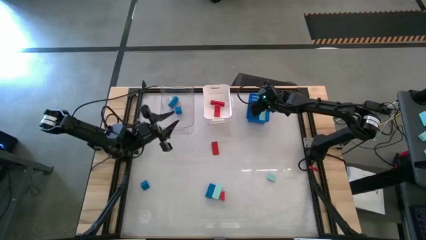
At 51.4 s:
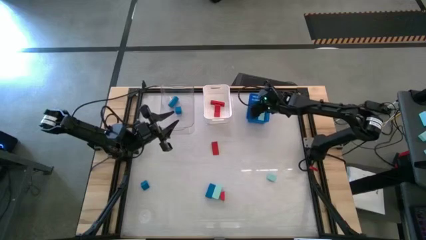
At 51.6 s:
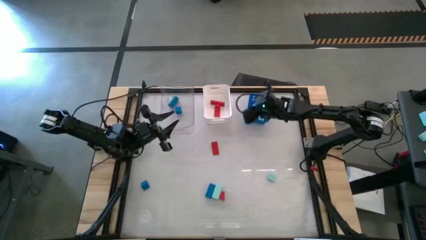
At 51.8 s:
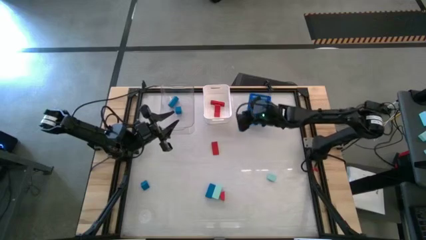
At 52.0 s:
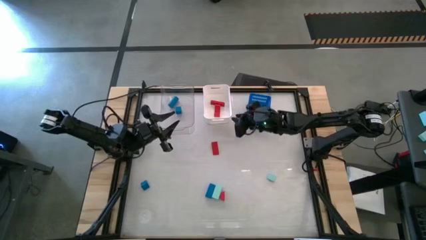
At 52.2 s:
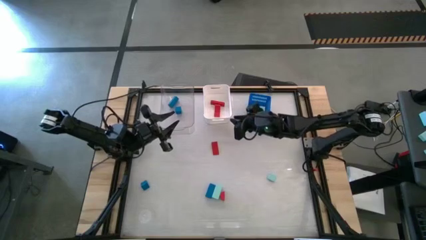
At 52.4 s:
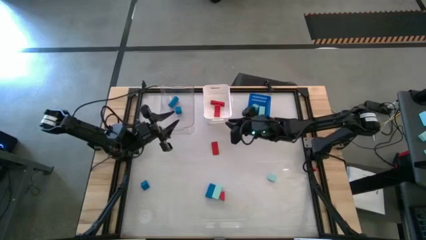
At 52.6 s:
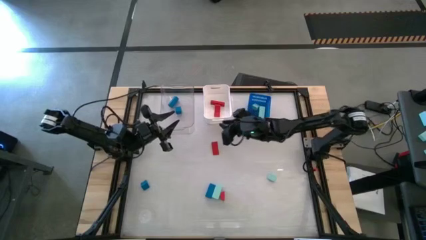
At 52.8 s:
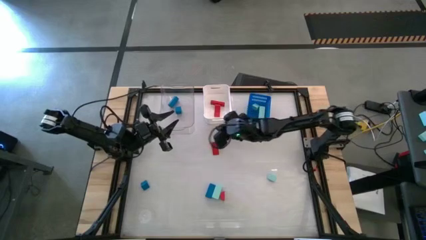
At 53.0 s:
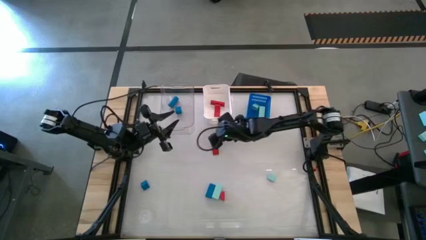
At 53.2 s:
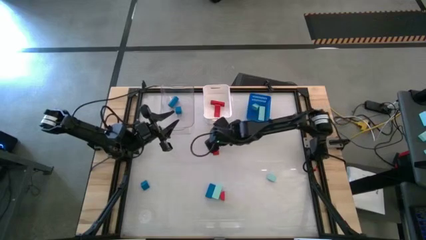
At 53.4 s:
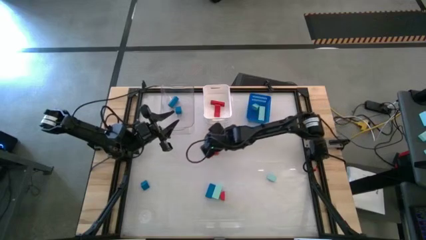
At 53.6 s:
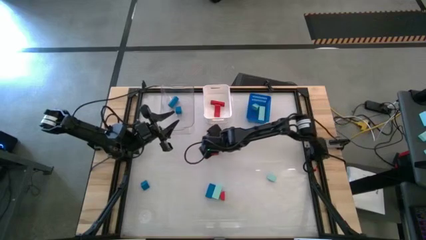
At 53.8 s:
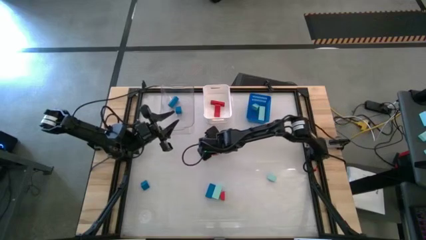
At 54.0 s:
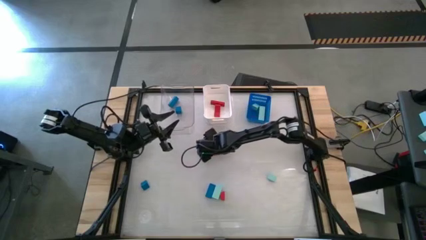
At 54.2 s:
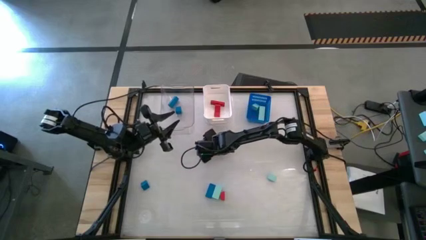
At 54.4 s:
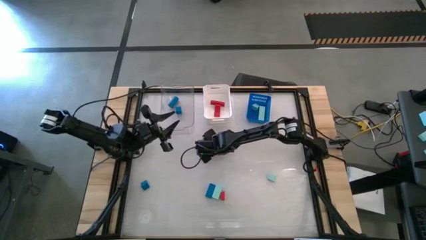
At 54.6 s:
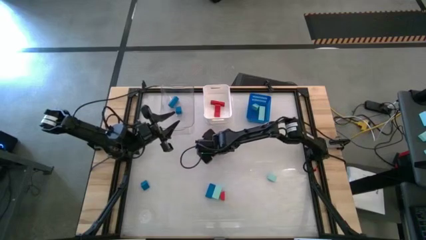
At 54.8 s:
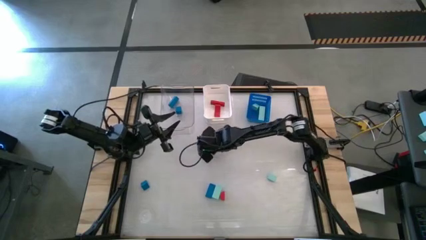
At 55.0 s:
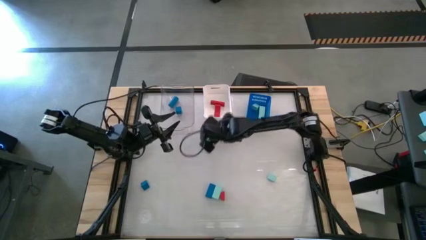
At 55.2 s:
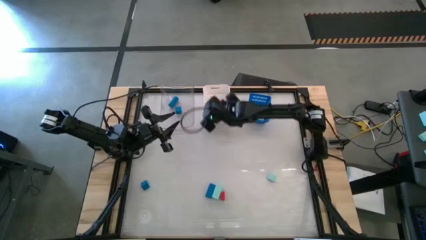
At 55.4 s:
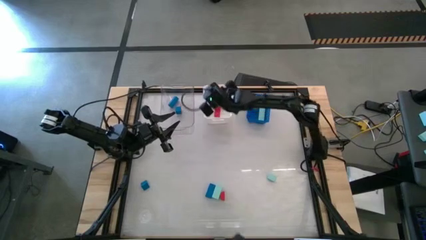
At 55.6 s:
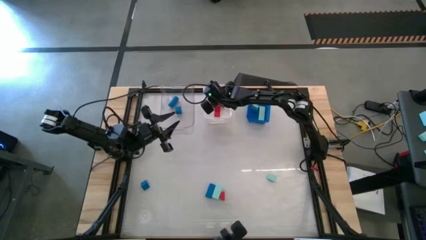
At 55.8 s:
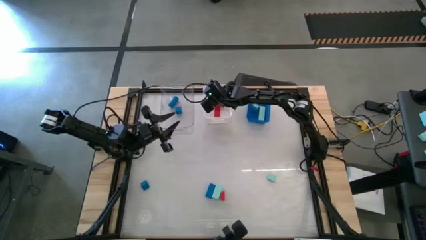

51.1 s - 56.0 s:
Task: Sort & place blocks by color
Put the top red block into the white bin

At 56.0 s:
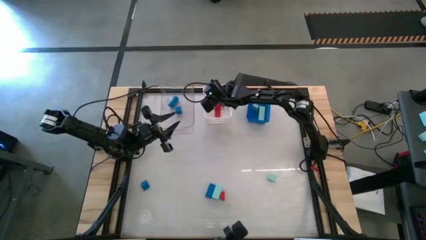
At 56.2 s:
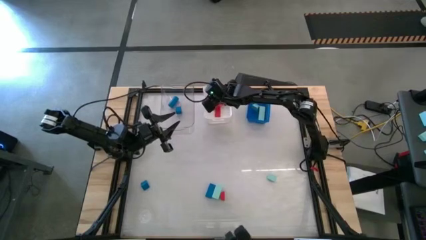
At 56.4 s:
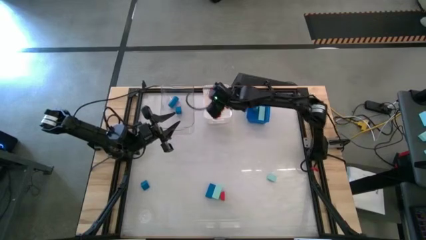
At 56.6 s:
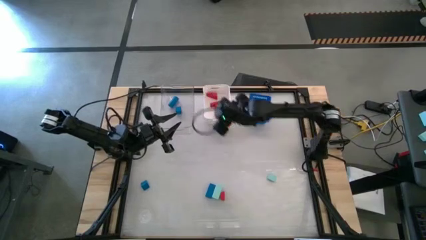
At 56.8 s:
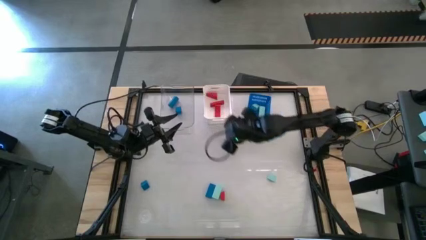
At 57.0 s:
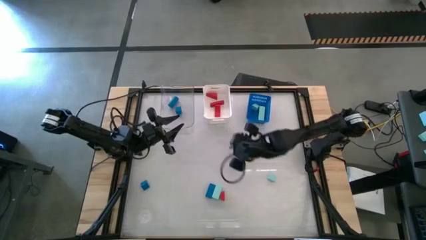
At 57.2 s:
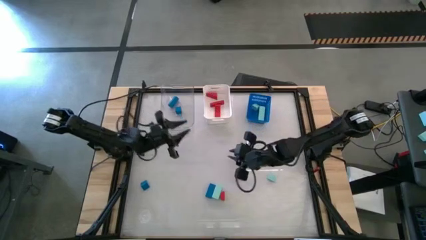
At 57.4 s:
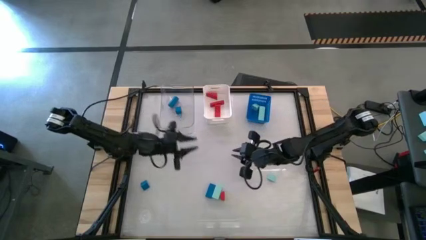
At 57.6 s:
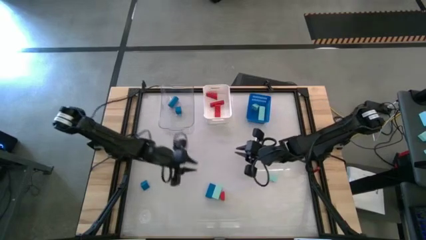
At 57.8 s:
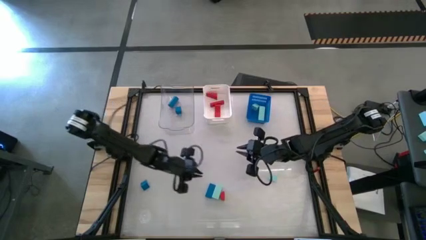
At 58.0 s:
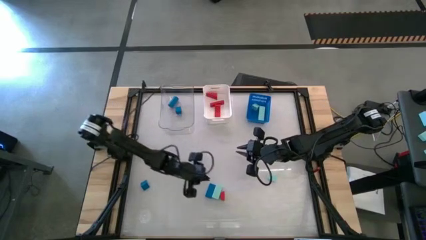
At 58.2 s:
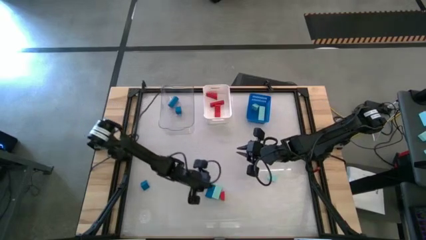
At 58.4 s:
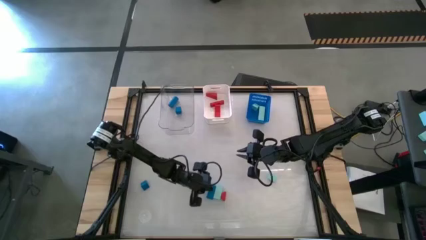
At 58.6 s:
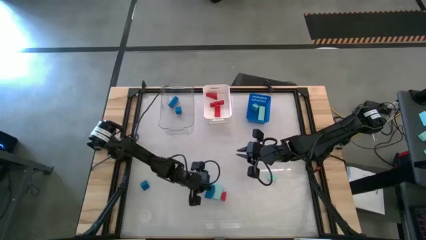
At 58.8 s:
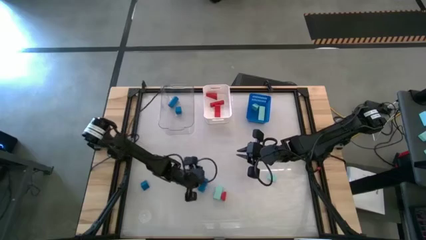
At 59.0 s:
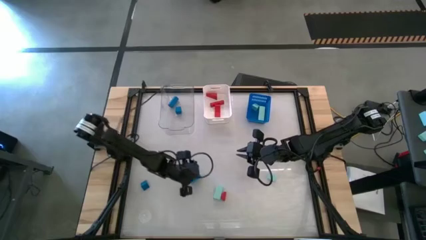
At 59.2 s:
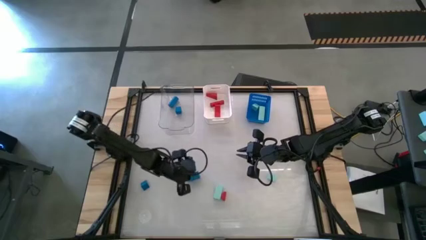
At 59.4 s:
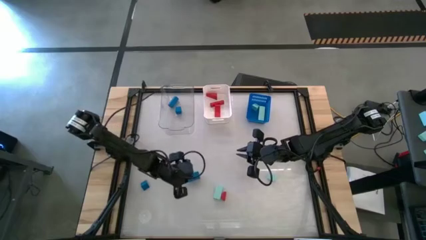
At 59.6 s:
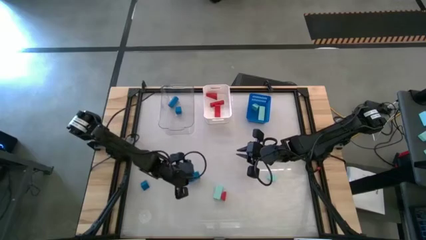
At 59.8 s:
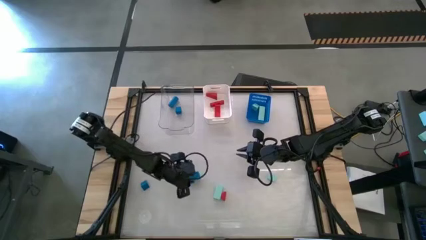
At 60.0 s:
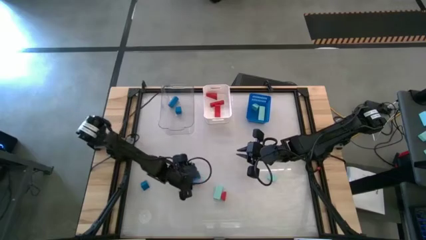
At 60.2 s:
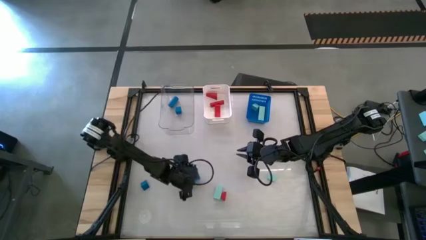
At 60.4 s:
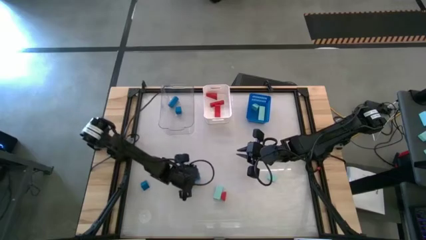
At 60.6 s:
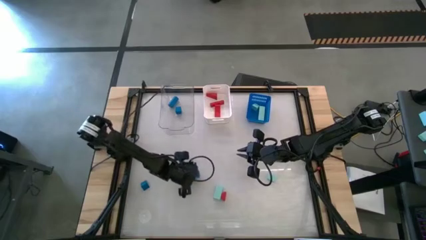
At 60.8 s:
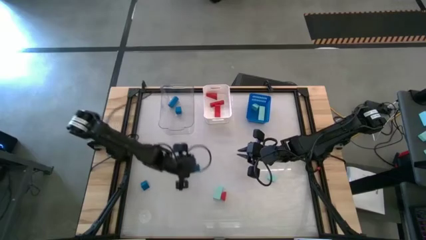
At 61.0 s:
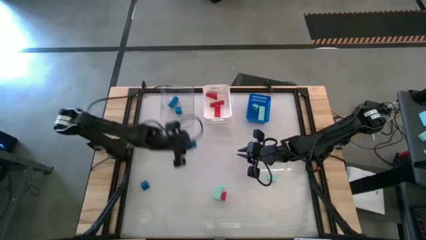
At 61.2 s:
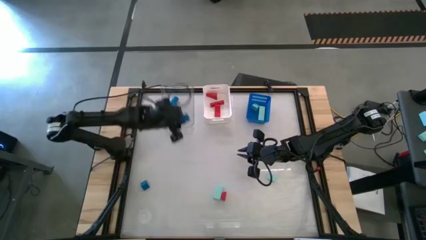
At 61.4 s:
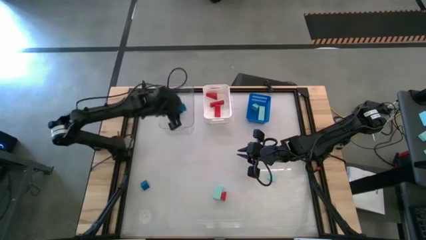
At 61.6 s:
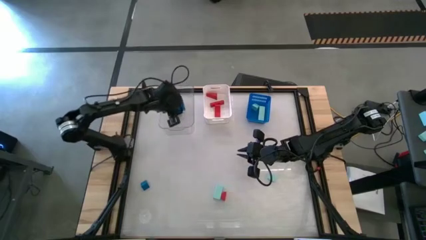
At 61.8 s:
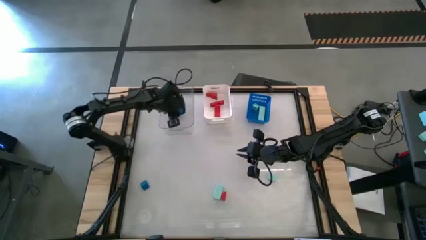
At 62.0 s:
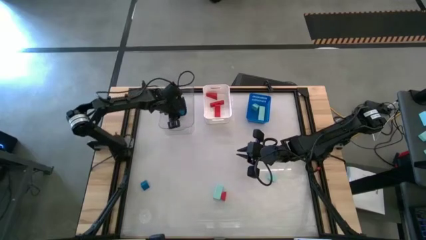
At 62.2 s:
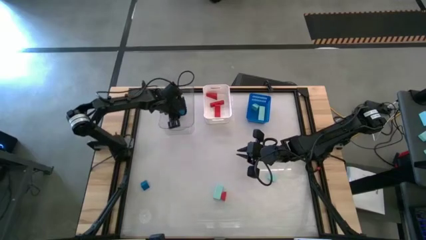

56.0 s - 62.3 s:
Put the right blue block into the transparent bin

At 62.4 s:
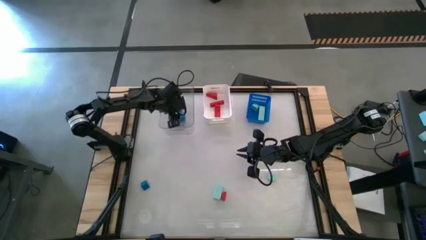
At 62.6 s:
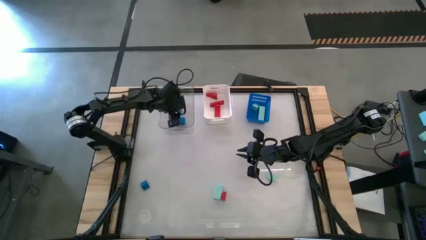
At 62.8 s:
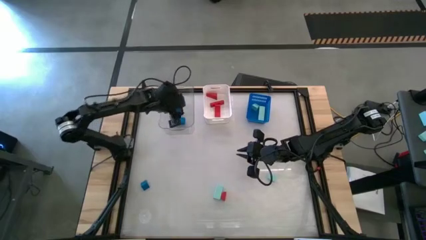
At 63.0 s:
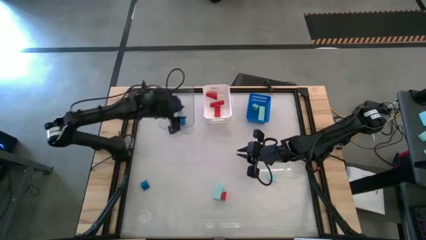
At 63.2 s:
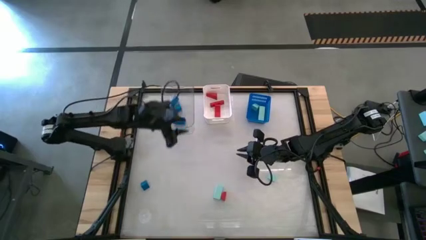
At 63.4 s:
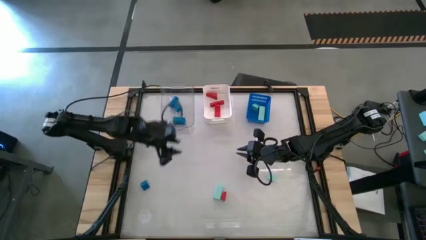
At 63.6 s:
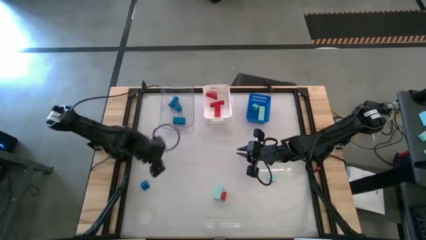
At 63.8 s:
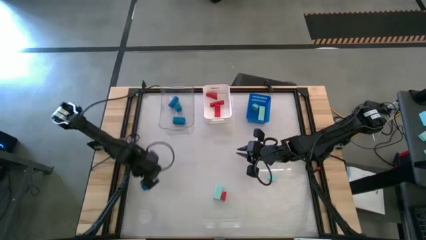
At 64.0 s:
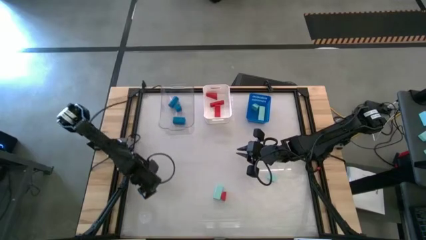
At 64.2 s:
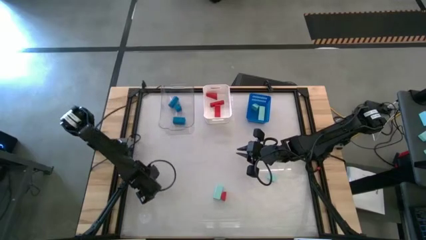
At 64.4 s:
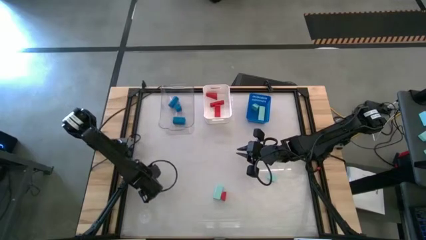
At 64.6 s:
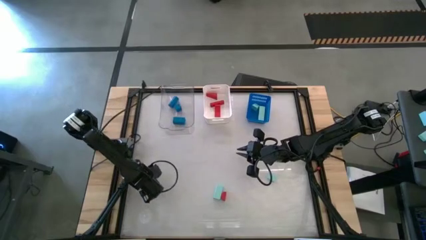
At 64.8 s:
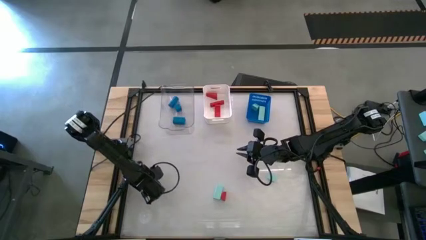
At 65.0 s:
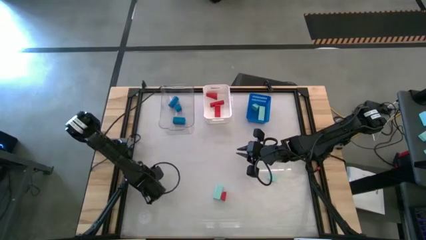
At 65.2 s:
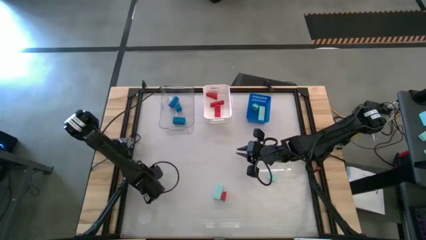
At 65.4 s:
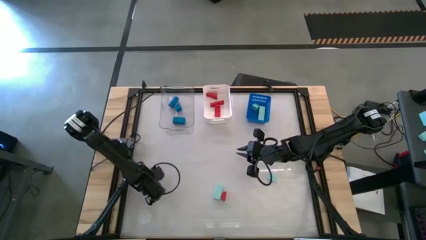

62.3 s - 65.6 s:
Put the right blue block into the transparent bin
